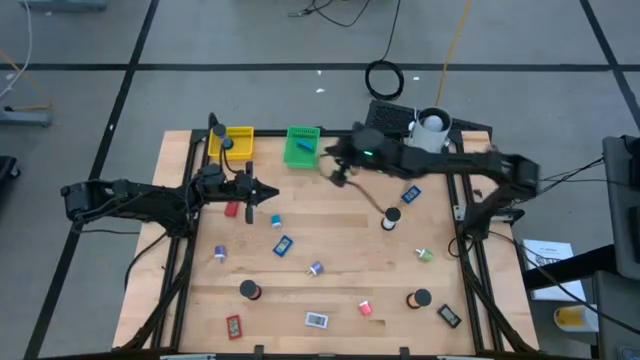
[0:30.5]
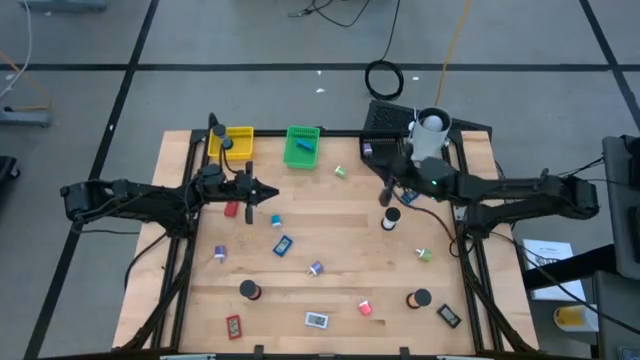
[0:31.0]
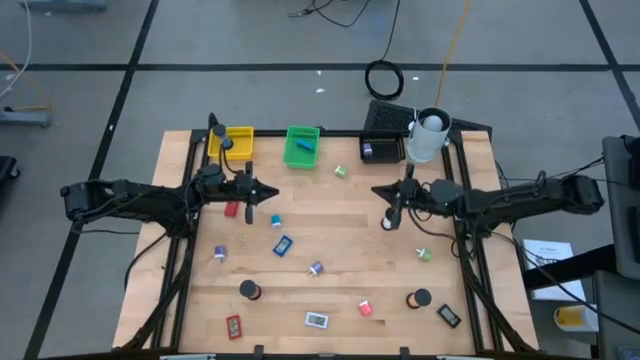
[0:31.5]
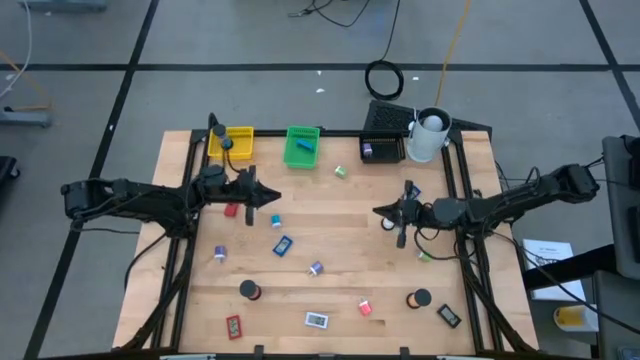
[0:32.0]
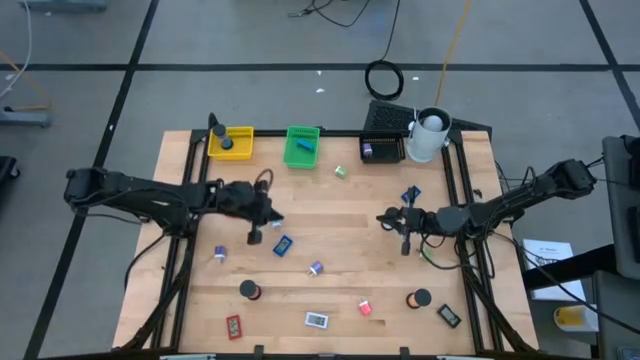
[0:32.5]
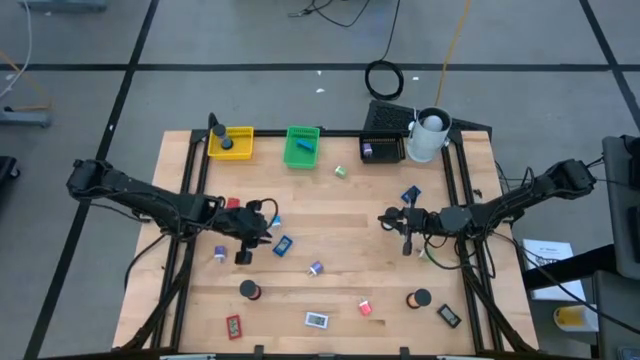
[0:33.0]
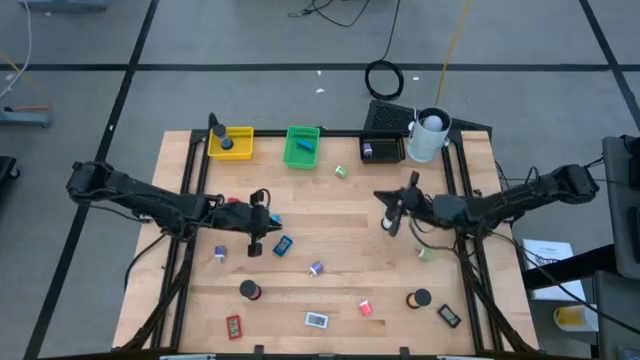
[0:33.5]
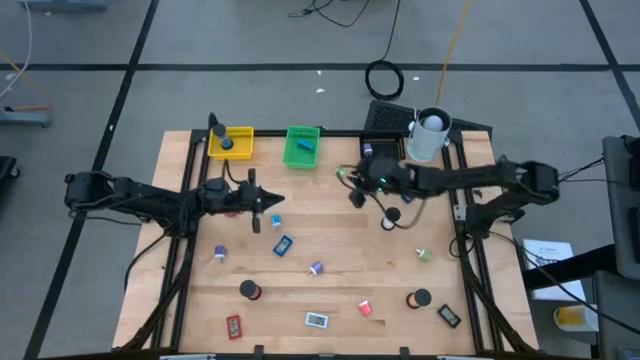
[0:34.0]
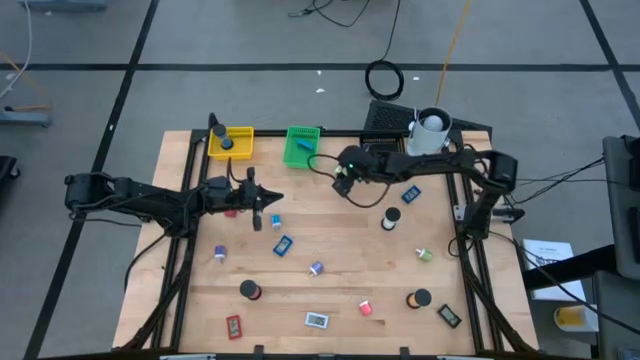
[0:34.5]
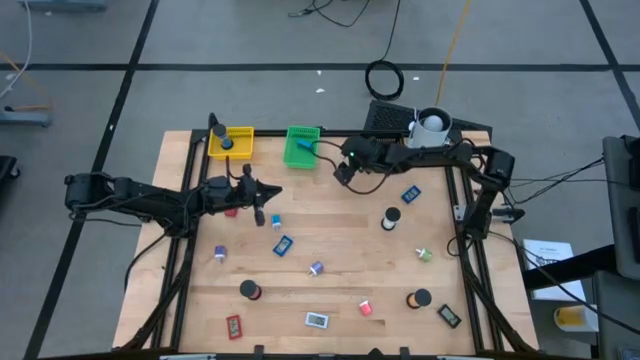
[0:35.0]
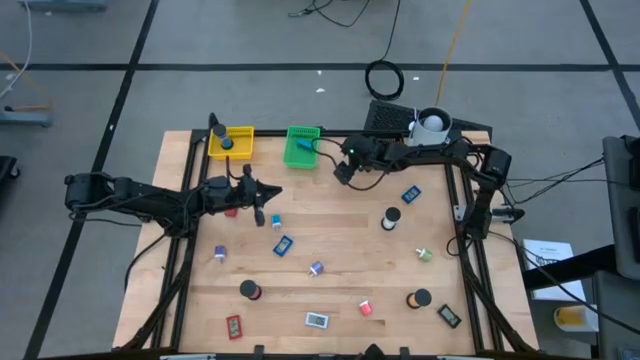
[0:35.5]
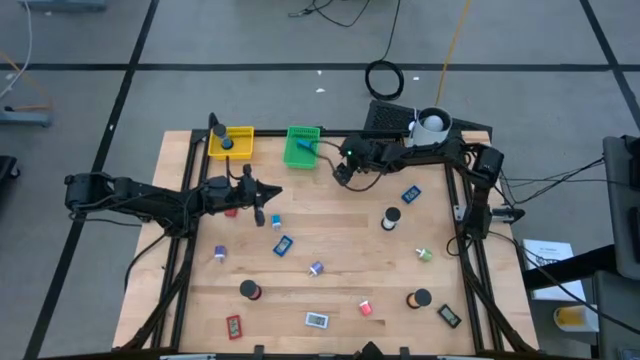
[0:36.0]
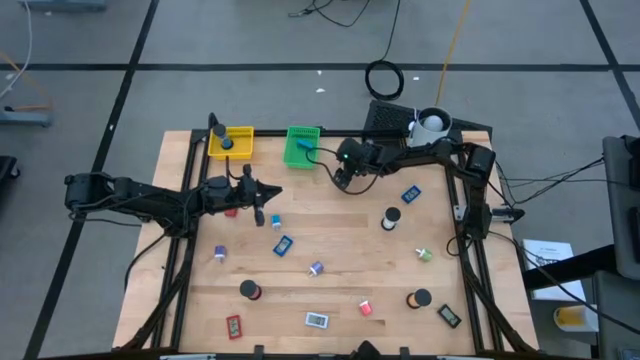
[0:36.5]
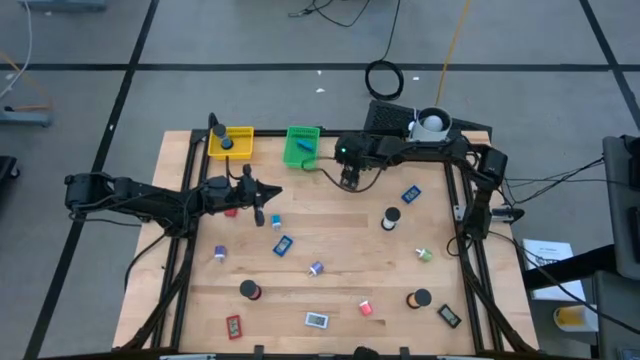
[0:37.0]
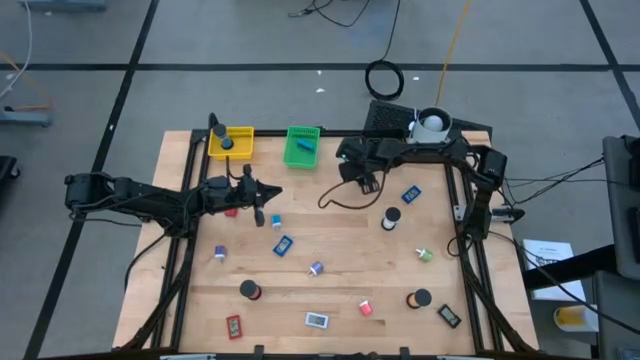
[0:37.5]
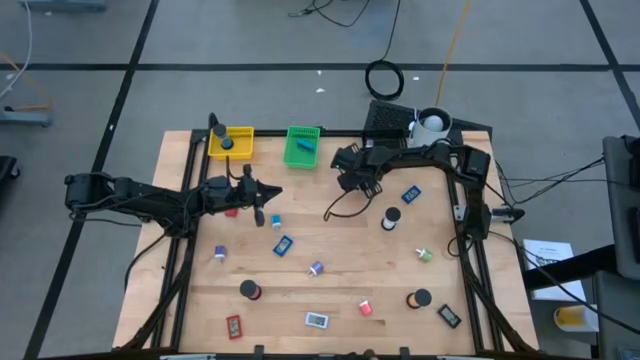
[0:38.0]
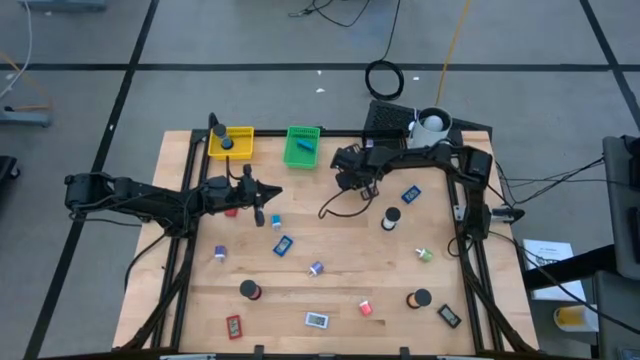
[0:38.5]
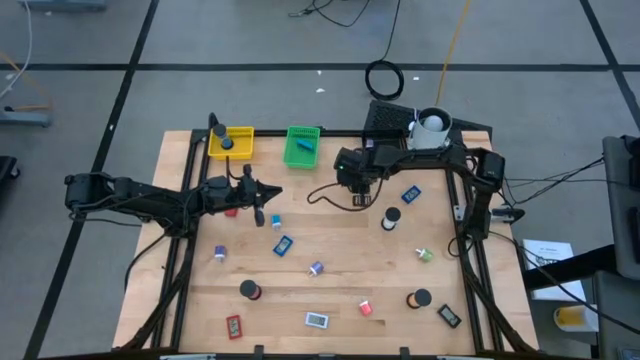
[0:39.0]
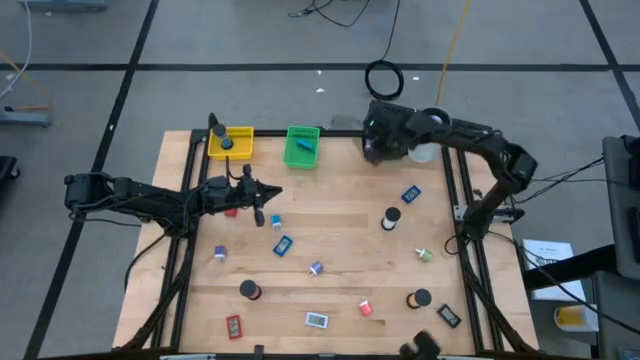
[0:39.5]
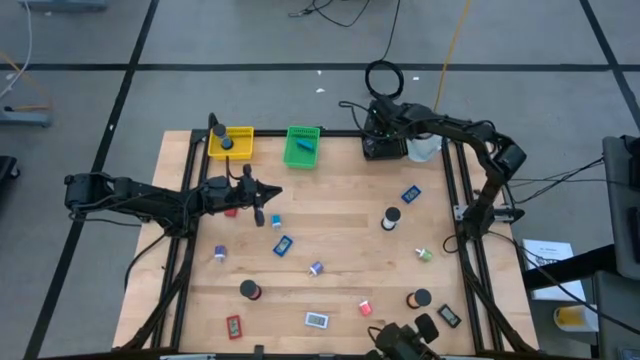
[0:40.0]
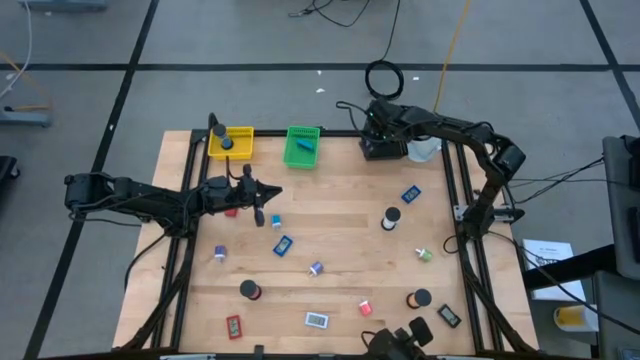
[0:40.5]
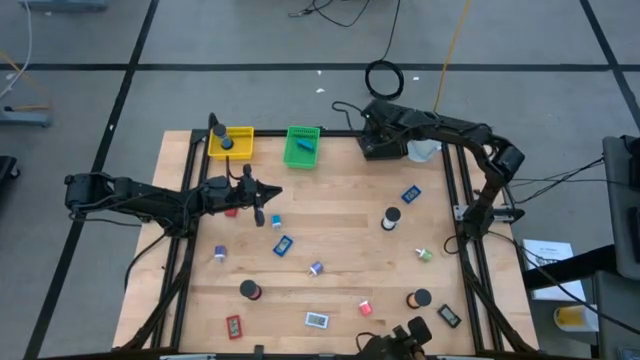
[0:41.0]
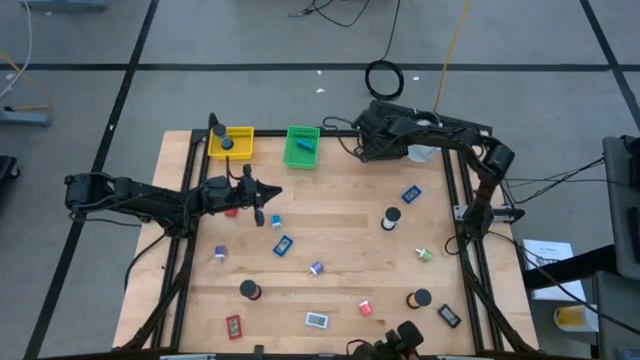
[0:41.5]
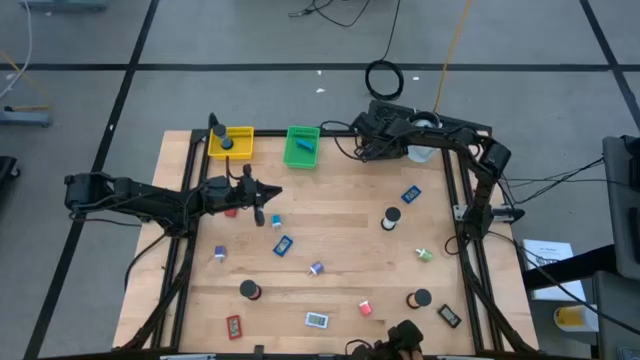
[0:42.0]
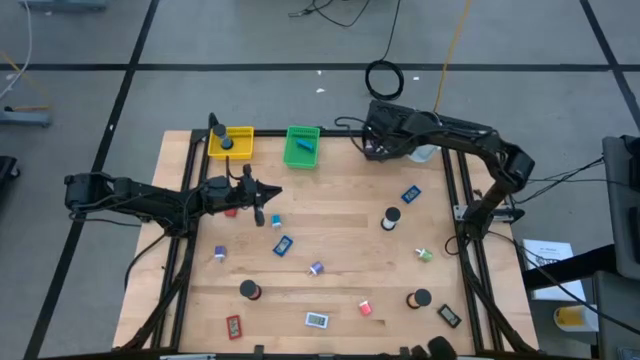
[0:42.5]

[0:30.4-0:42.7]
Task: Pick & Place Office items
Put the top green charger adapter into the black bin

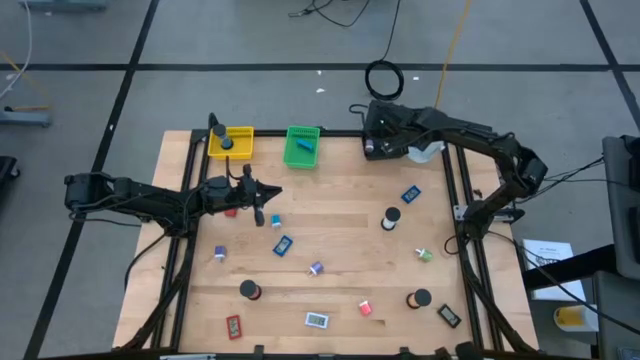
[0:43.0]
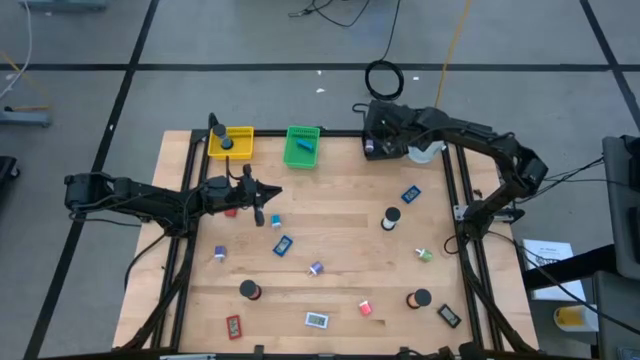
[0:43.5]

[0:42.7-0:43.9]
Adjust the white lamp

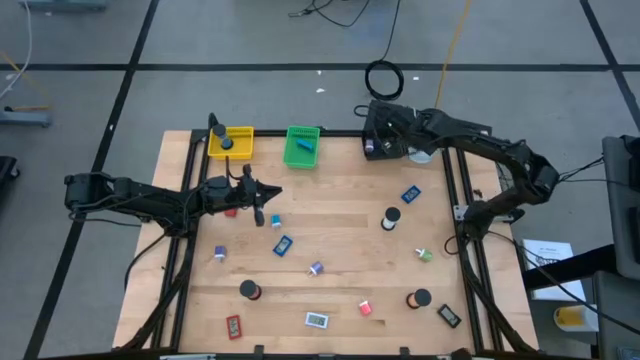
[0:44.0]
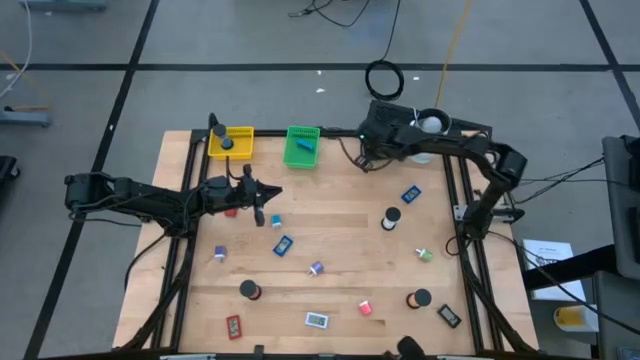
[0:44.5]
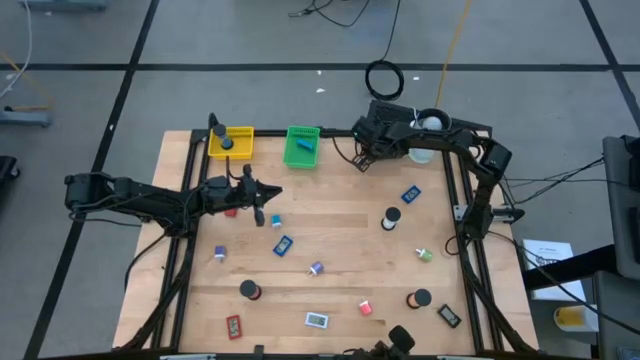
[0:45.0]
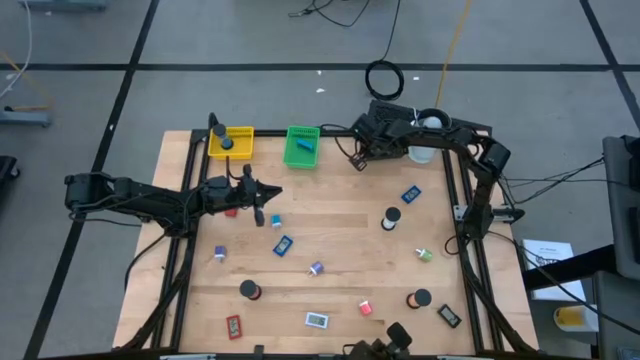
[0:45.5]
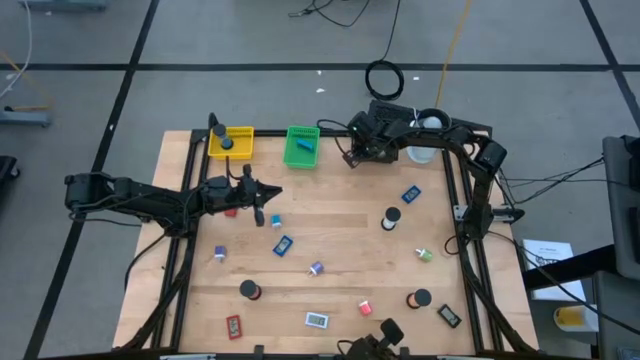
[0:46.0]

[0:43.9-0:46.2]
Adjust the black bin

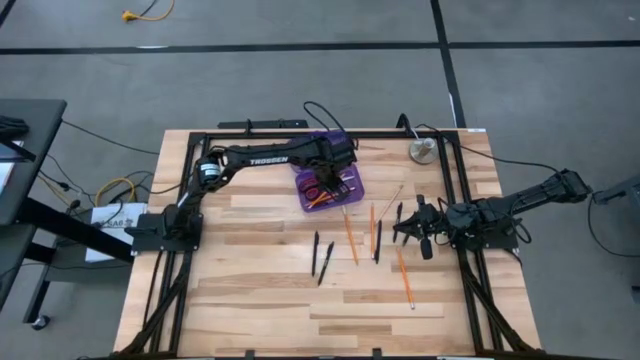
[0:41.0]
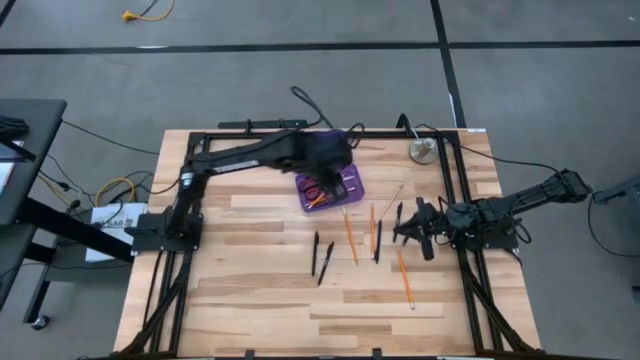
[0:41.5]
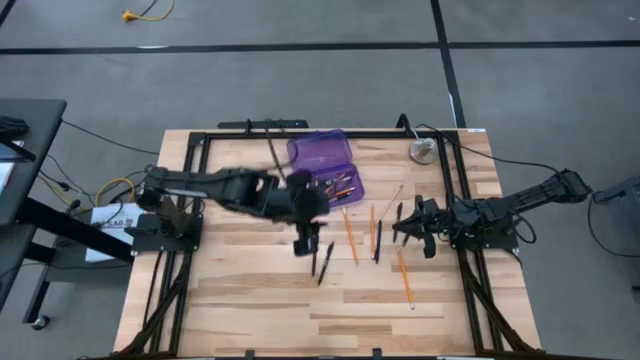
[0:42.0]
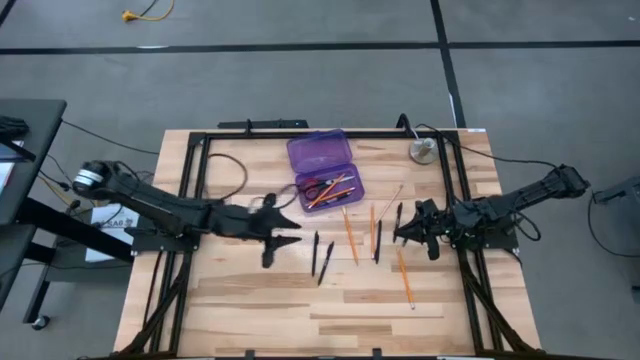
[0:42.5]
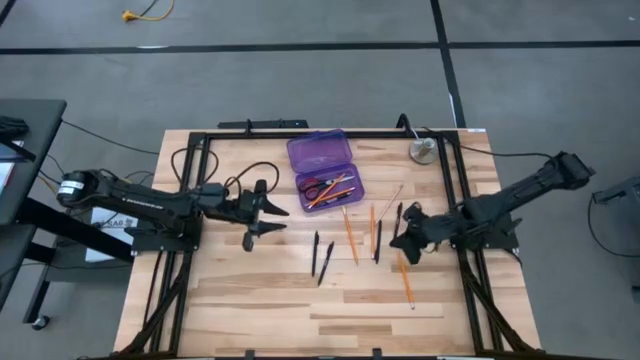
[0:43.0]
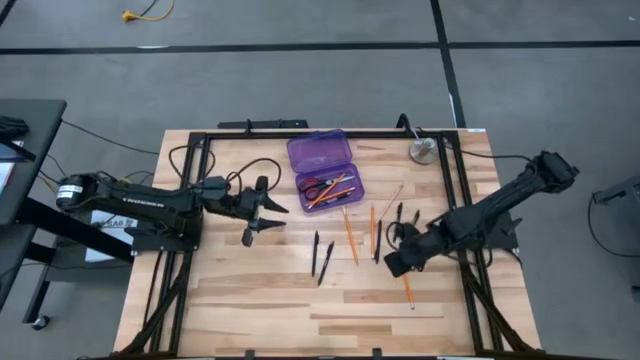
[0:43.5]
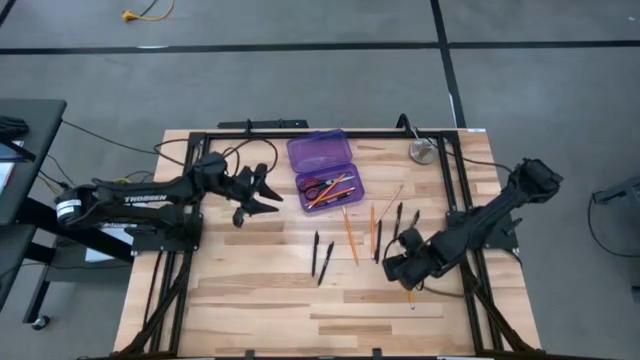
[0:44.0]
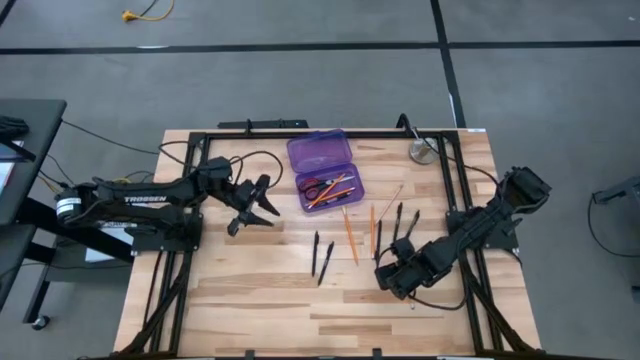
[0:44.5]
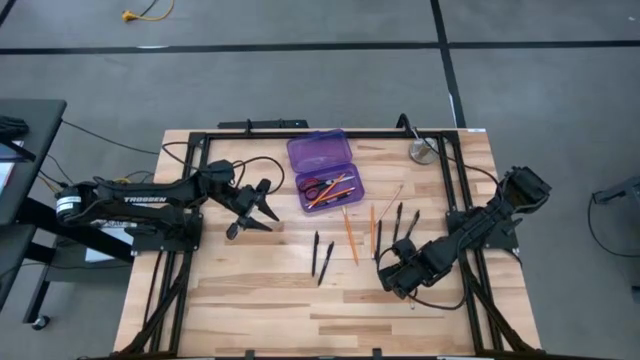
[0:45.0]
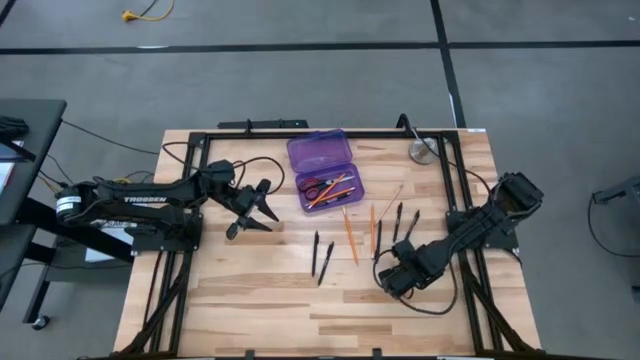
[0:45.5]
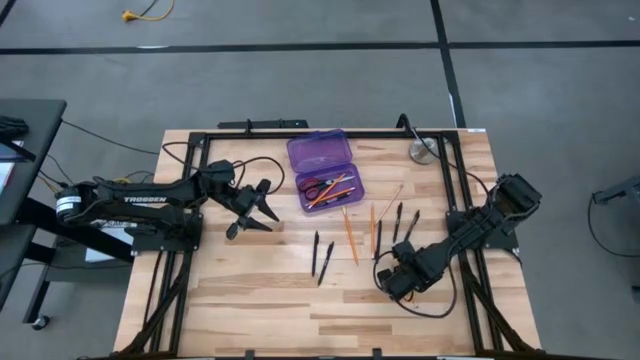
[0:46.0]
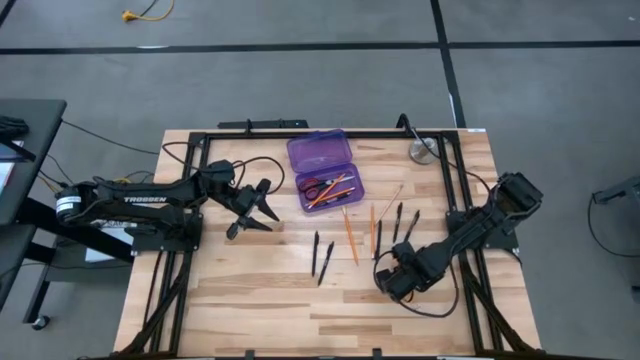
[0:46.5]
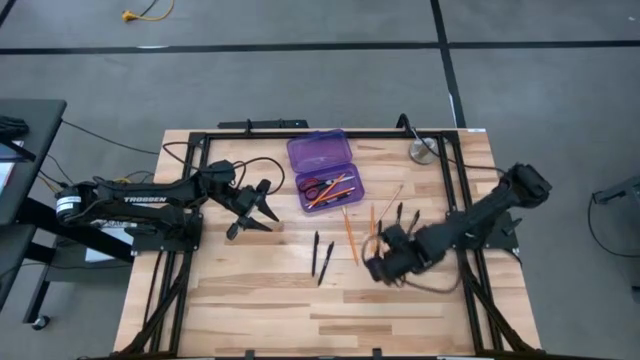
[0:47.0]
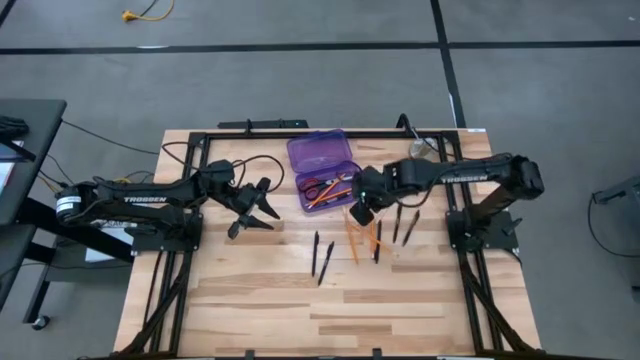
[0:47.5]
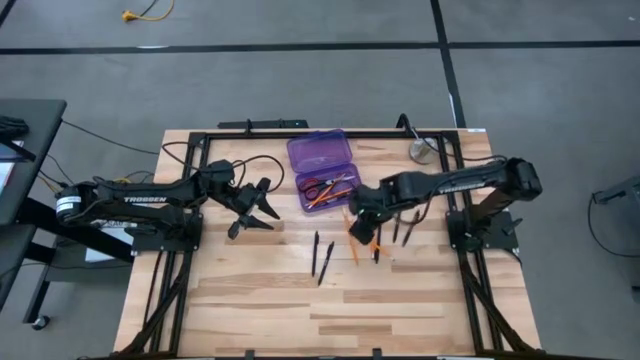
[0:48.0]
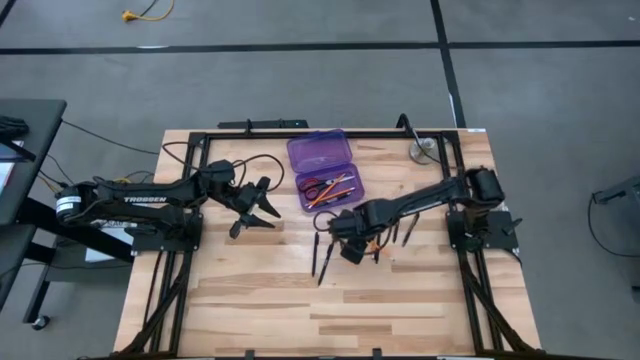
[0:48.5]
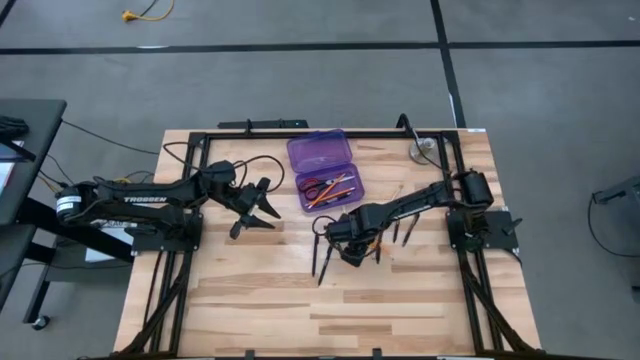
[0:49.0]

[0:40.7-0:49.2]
Task: Pick & place school supplies into a supply box
Put the yellow pencil into the purple supply box
